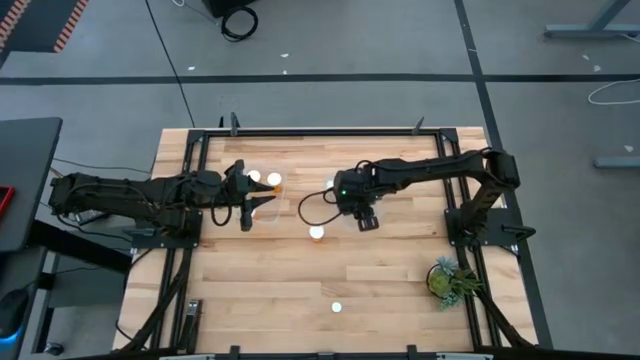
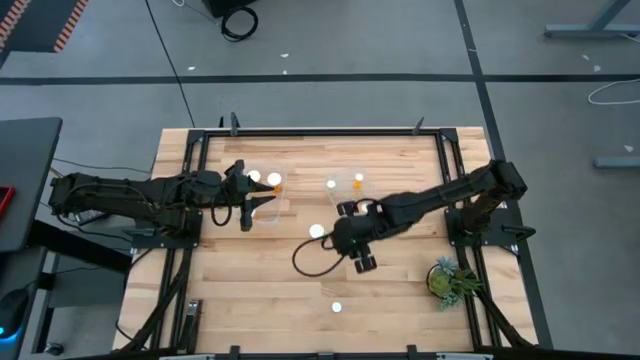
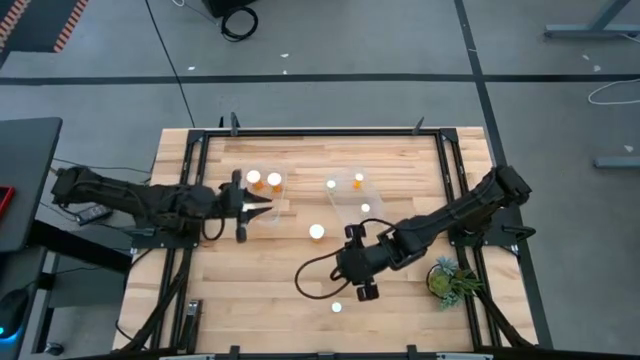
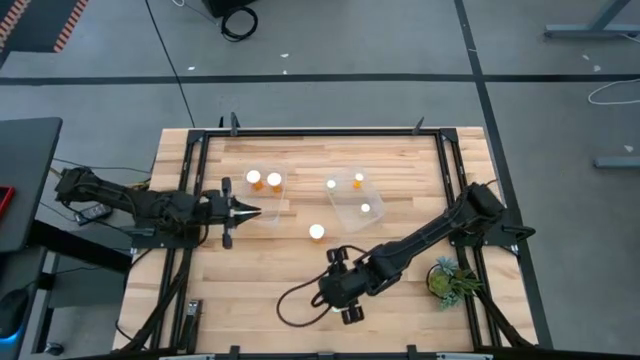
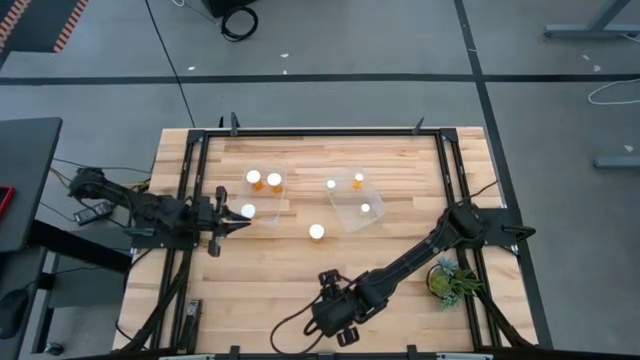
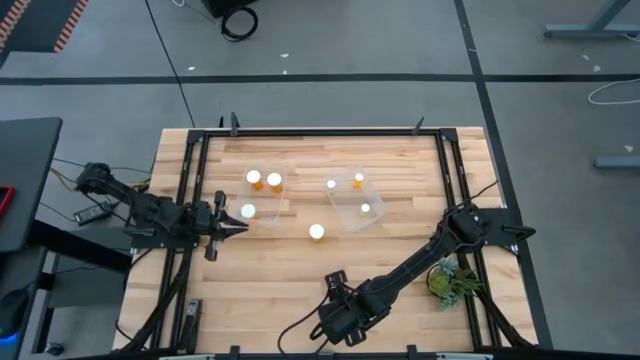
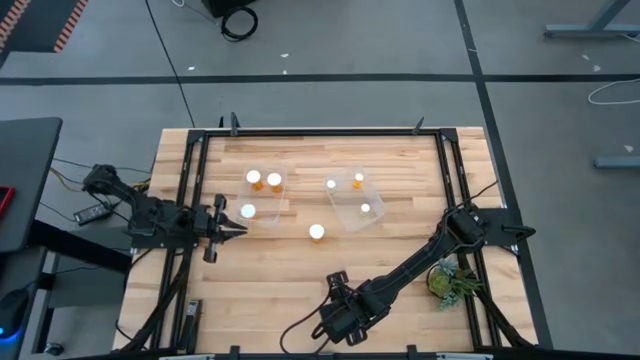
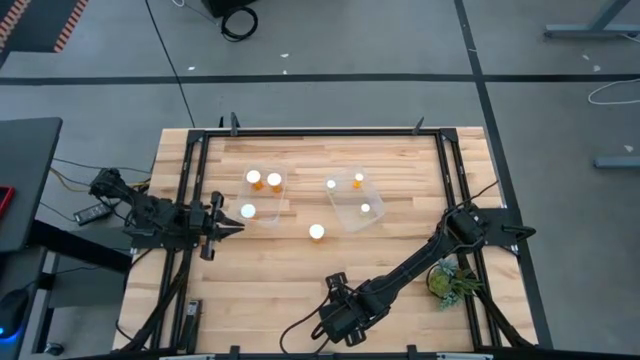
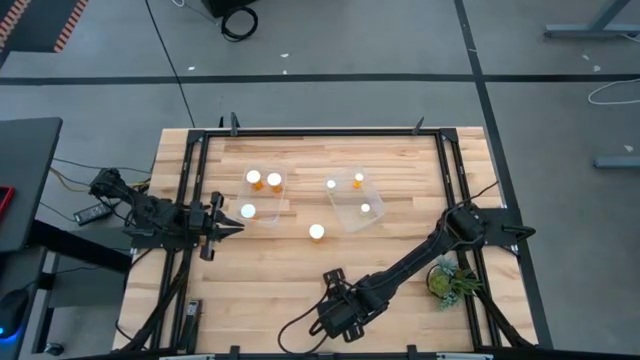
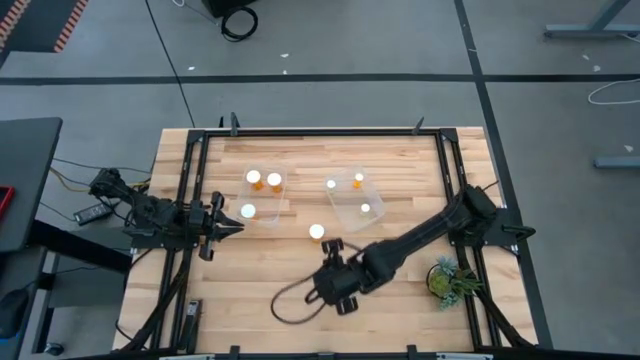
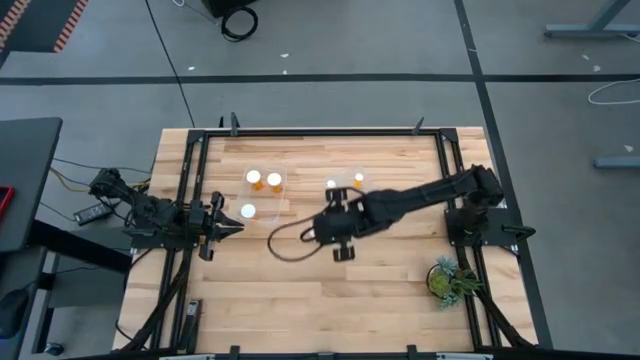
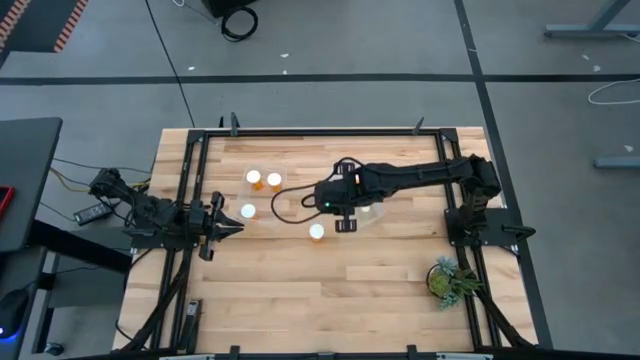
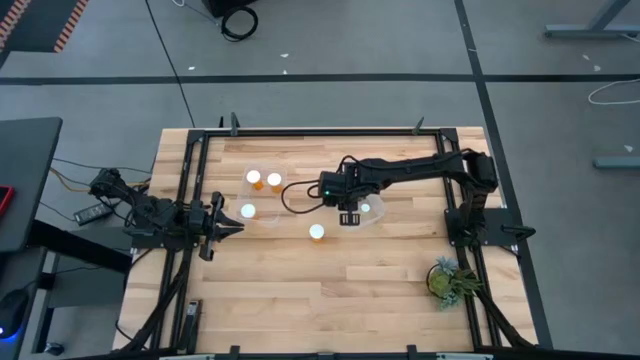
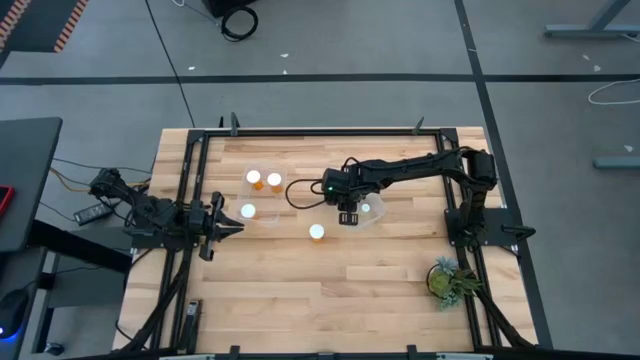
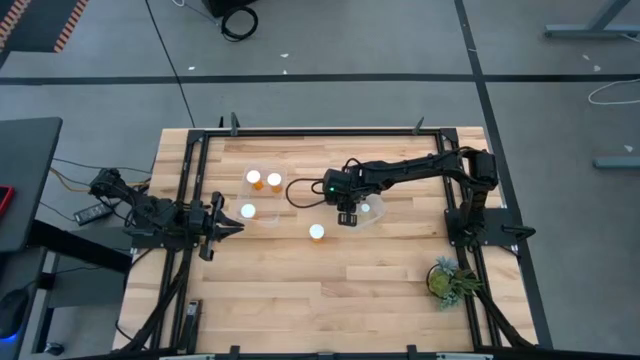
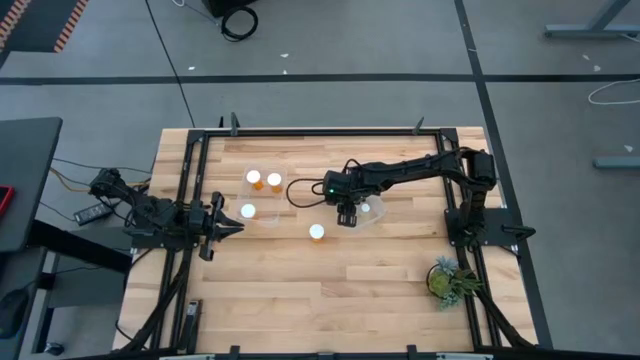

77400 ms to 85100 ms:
Task: Pick and place medicine bottles into bin by pill shape (circle, oval)
Put the small yellow pill bottle into the right transparent bin

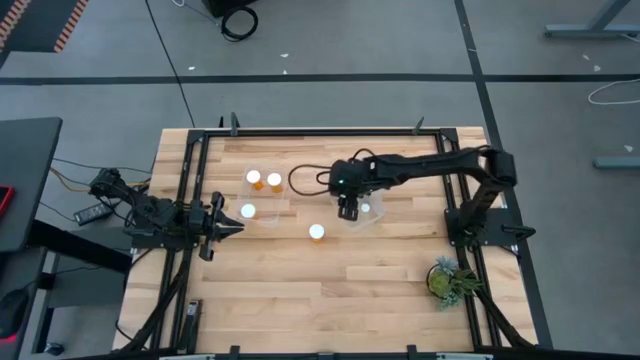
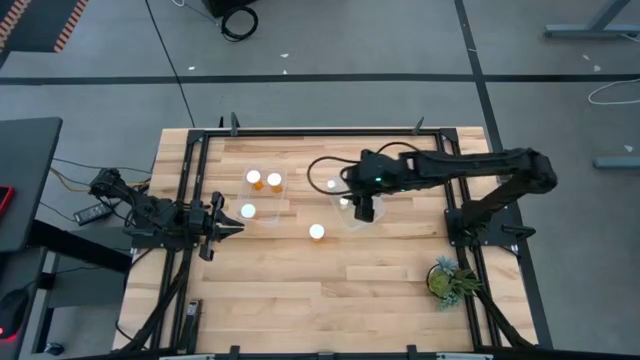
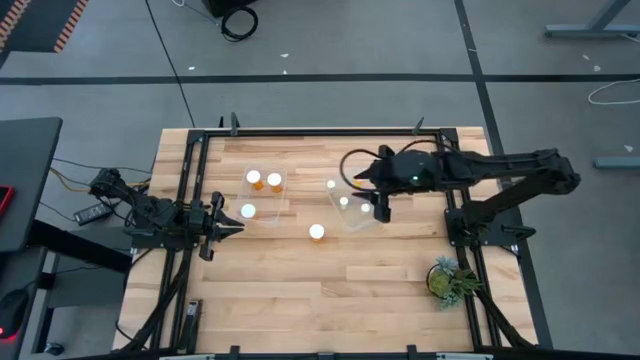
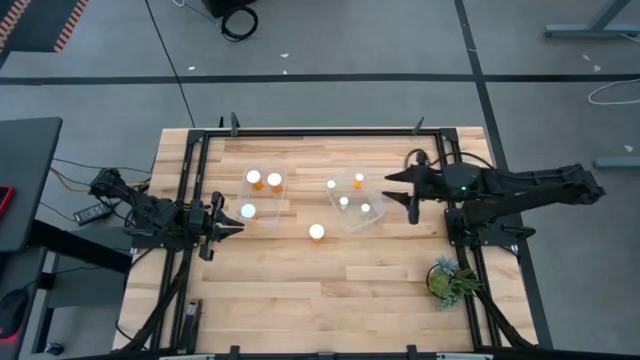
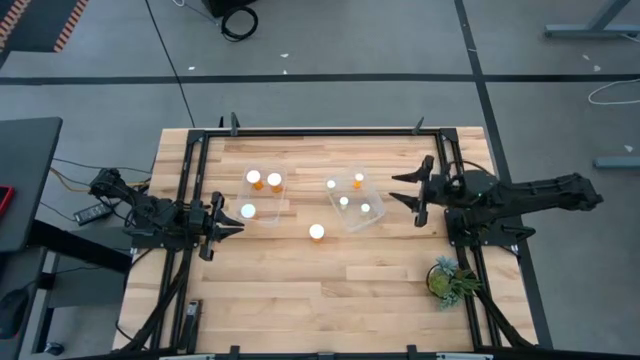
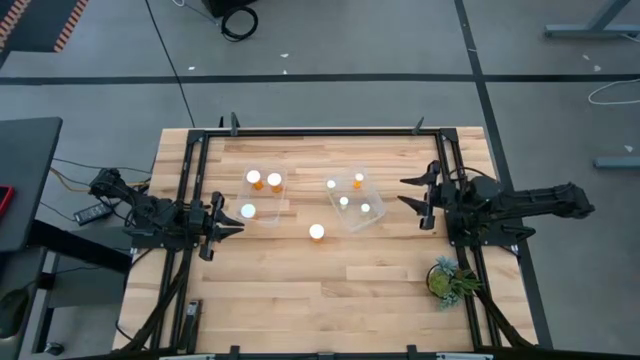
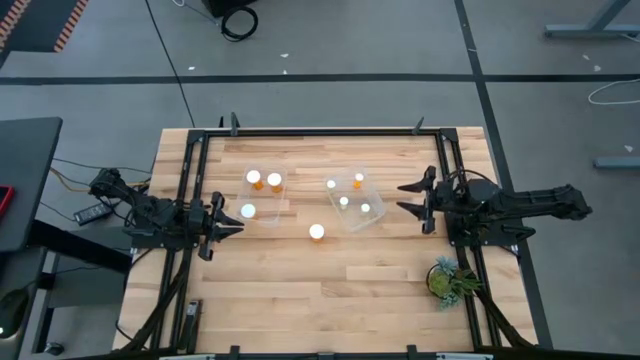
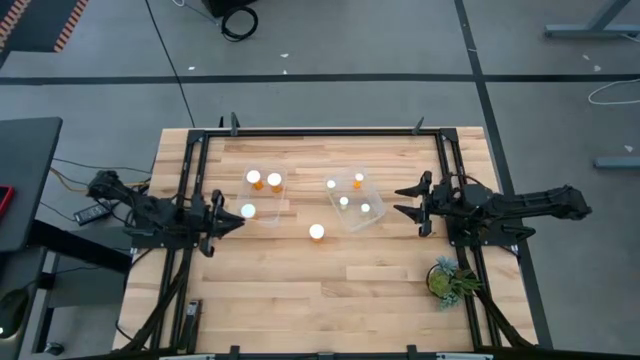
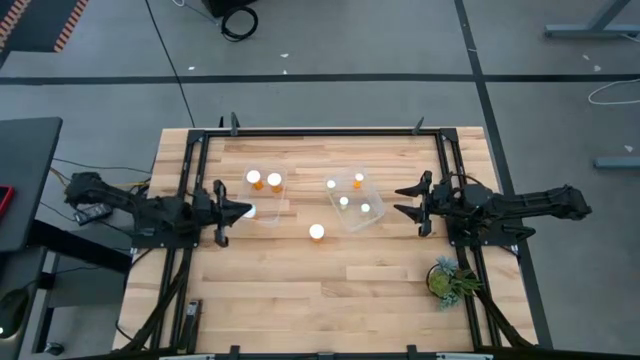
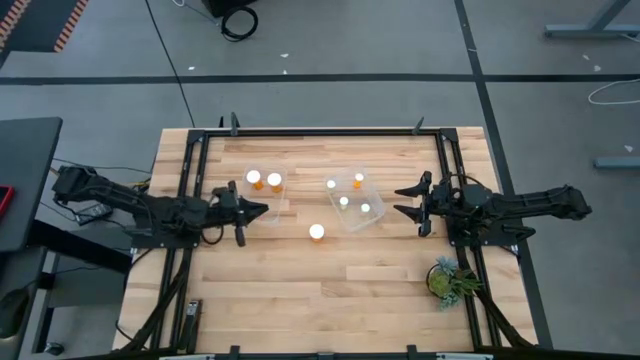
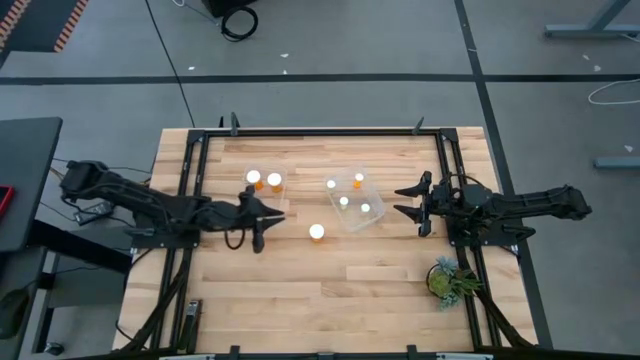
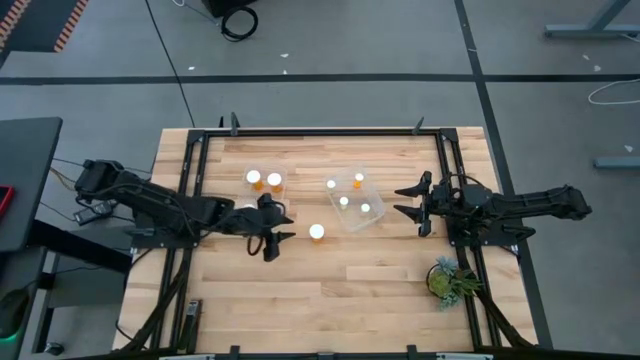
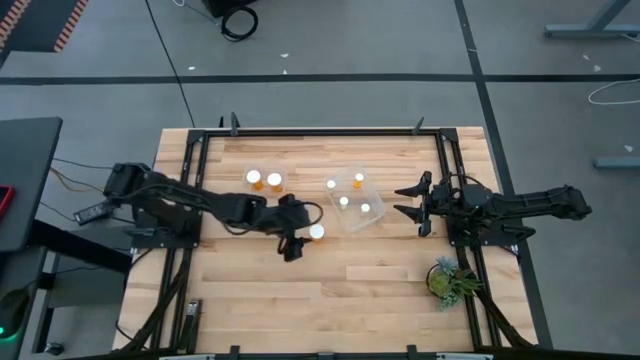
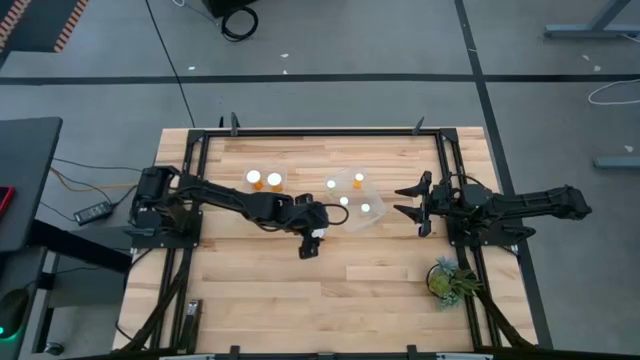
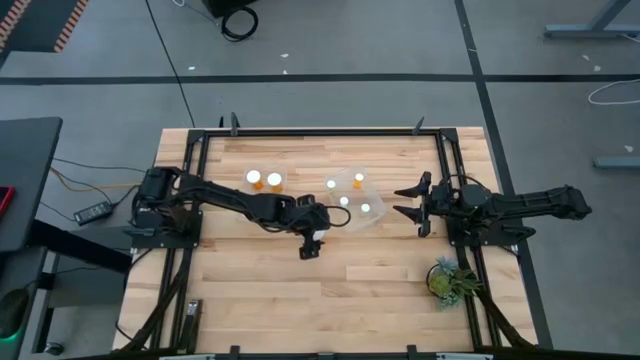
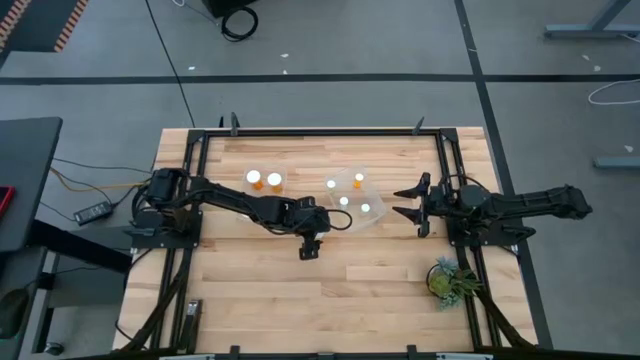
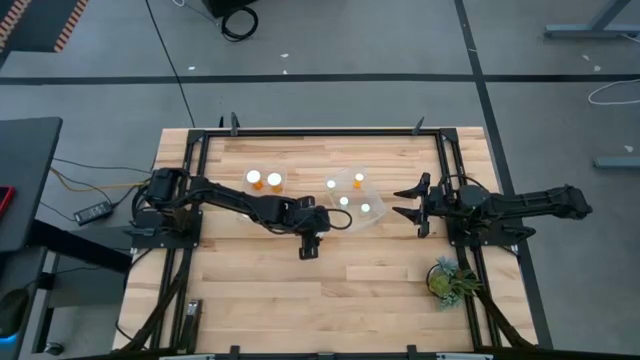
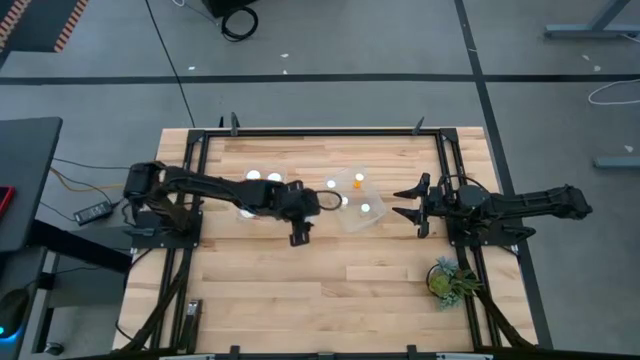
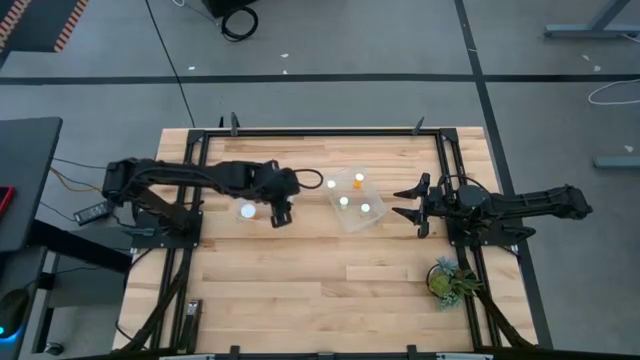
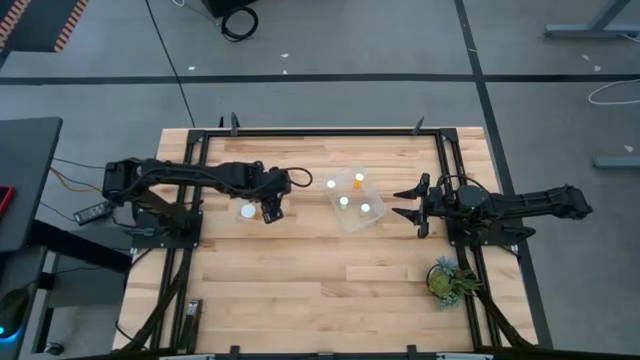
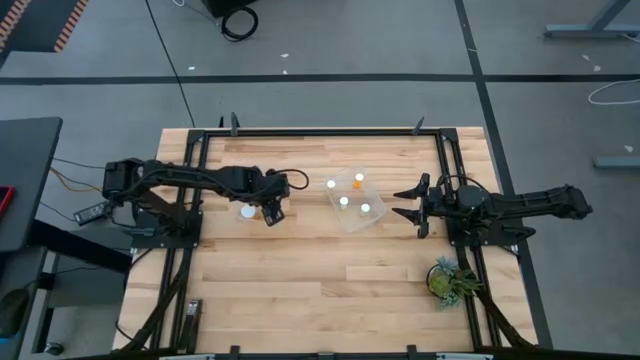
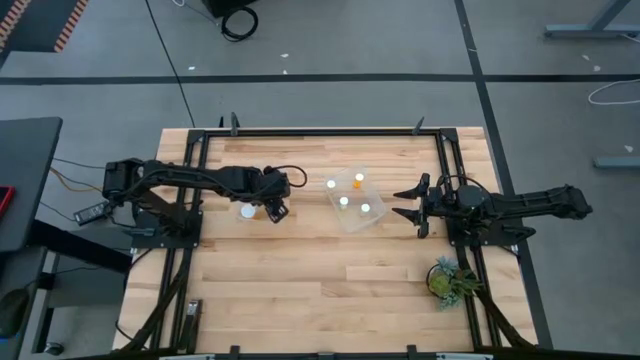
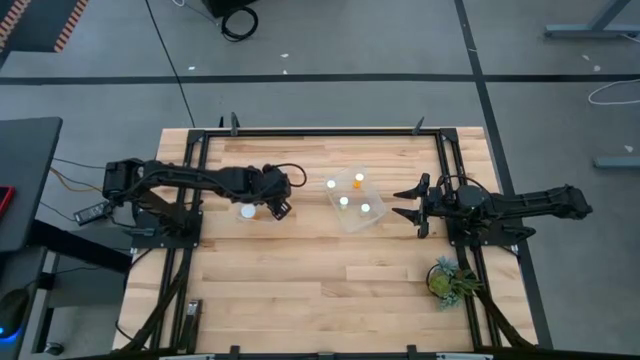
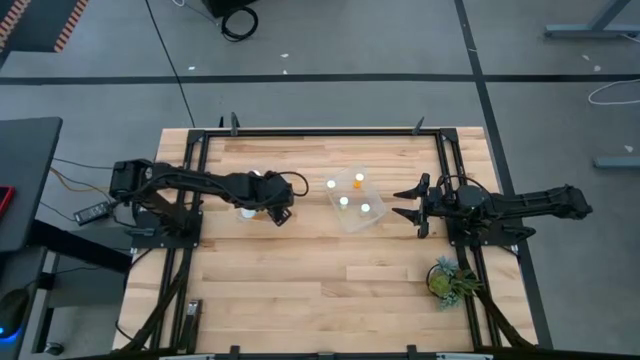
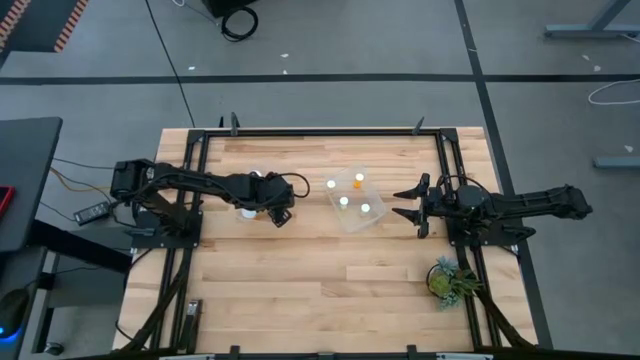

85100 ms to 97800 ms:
Put the large orange pill bottle into the left transparent bin
